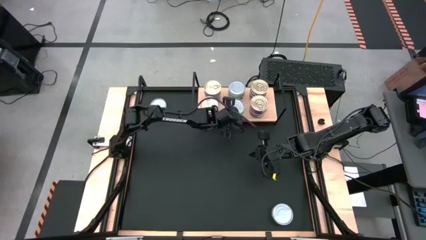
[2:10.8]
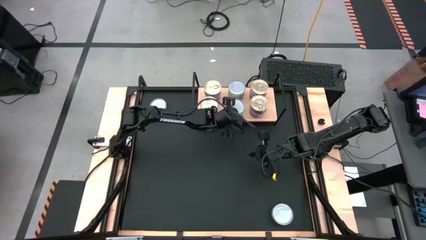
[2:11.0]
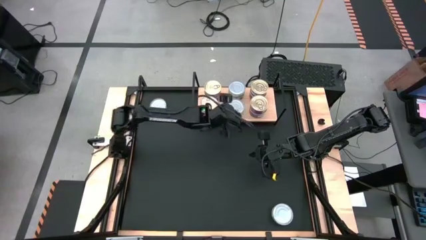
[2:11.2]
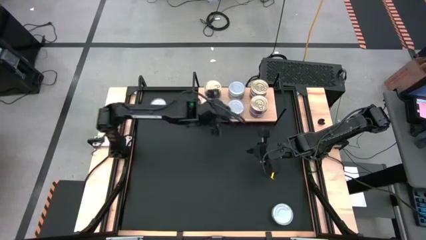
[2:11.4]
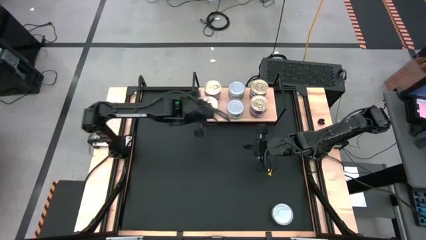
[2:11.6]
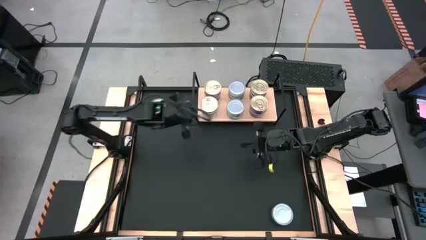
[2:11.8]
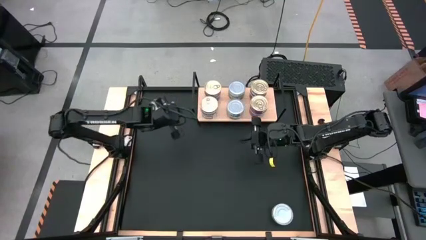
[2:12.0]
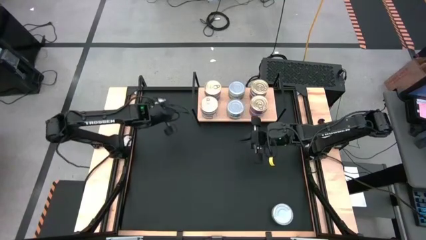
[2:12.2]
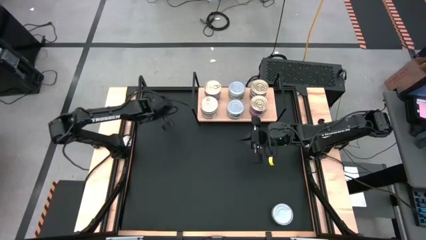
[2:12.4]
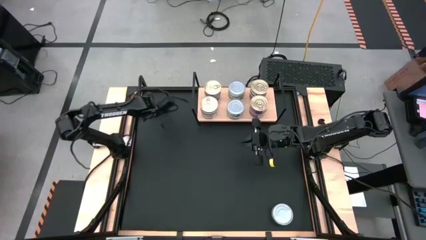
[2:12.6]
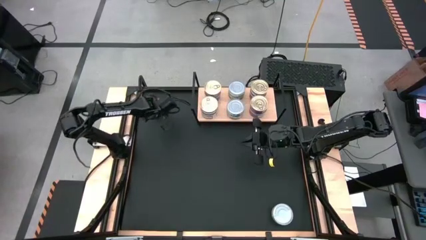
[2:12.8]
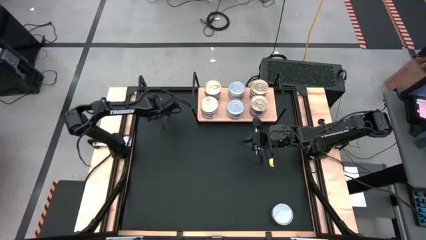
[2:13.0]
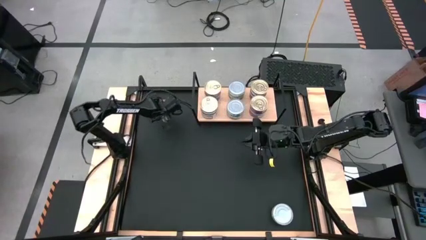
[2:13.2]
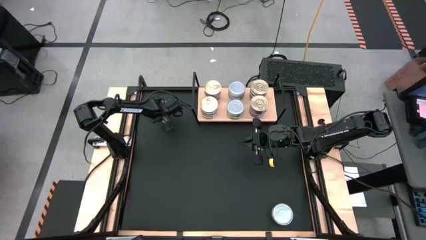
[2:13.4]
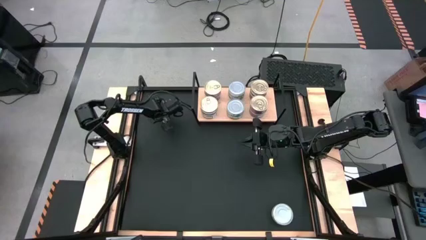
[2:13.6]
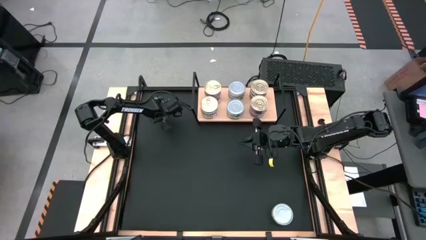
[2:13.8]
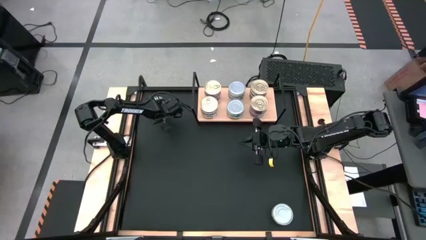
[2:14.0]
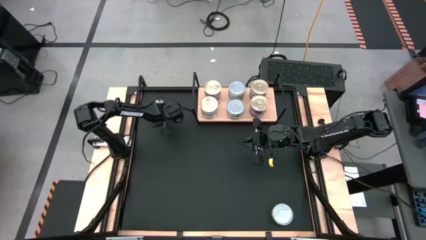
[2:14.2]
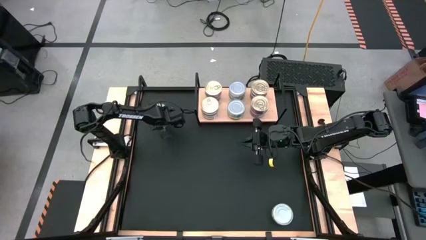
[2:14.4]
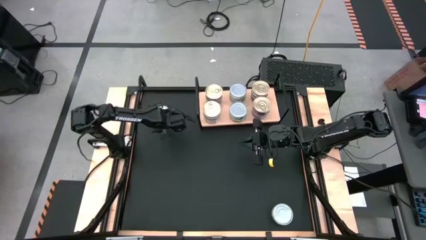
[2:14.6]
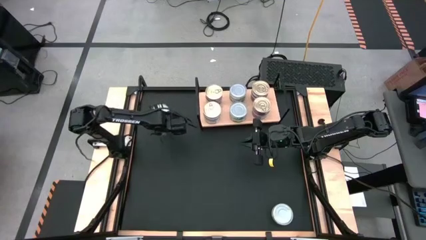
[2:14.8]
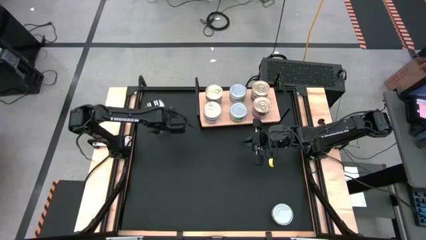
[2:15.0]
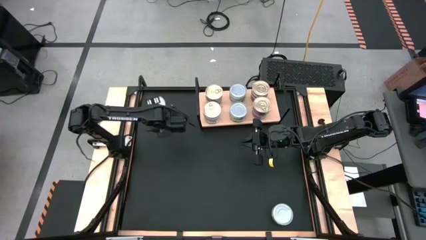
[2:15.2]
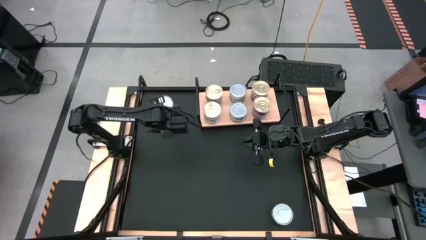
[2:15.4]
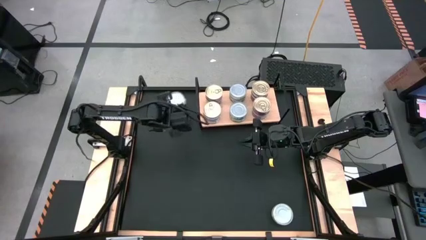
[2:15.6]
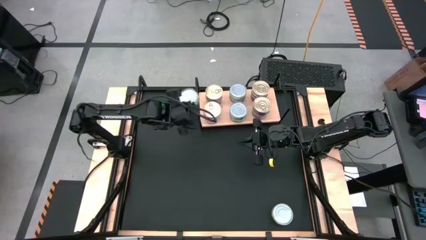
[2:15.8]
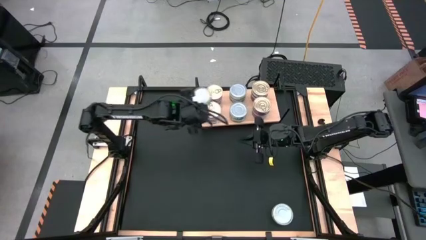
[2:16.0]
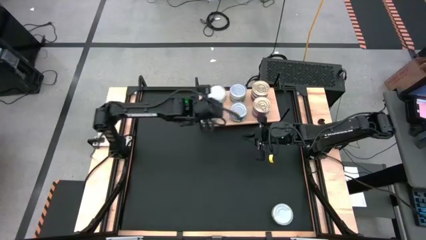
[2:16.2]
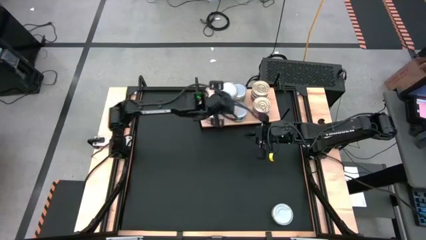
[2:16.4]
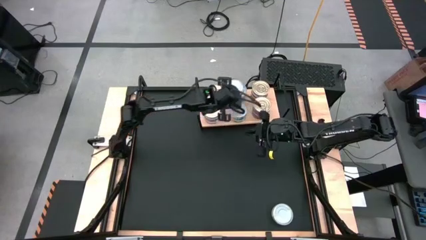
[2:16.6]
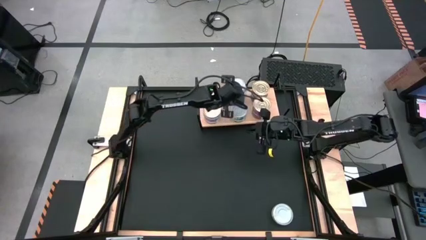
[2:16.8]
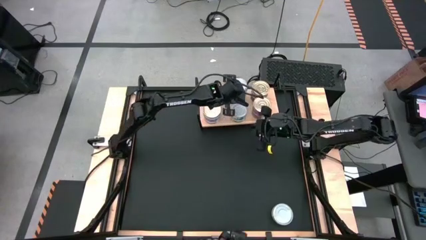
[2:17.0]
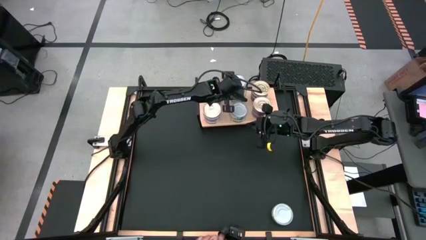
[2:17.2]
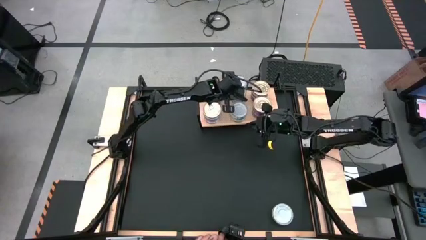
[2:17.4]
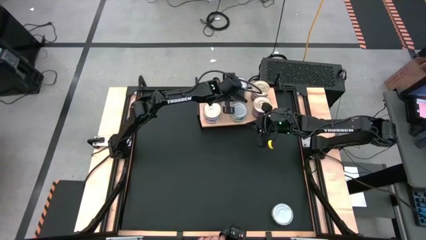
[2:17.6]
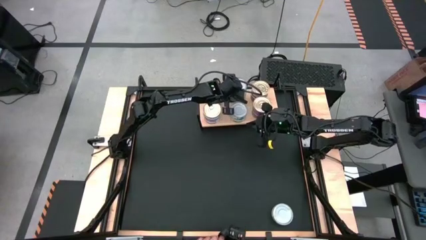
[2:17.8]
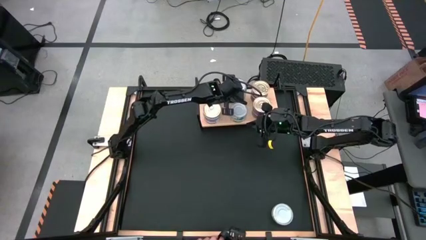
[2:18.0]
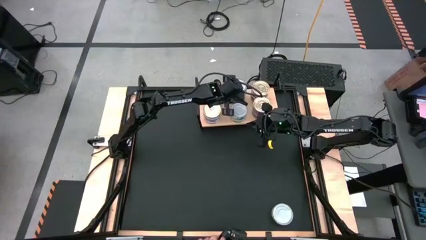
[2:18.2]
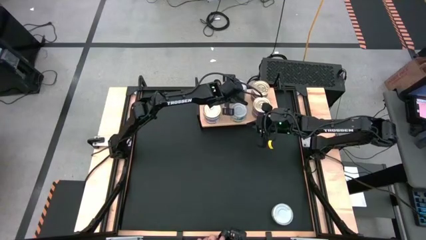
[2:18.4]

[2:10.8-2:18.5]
Task: Stack canned seafood by type on shelf
Stack the green tuna can on top of the other green tuna cans on the shelf

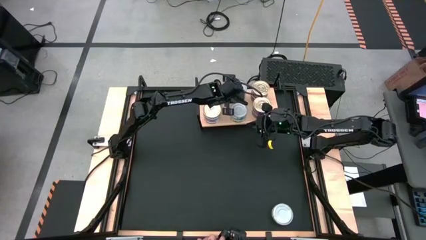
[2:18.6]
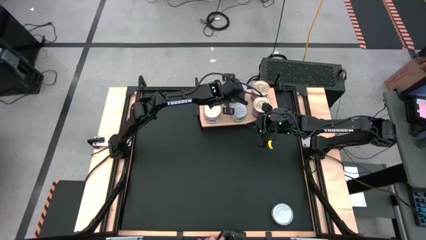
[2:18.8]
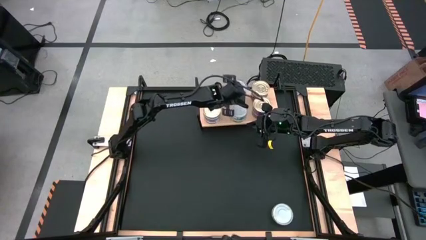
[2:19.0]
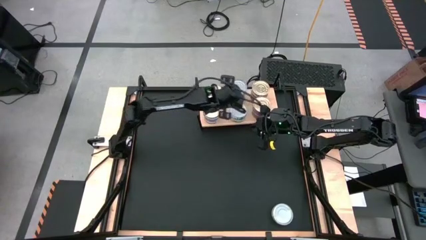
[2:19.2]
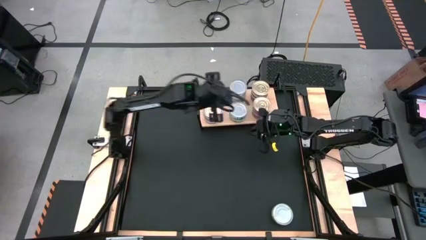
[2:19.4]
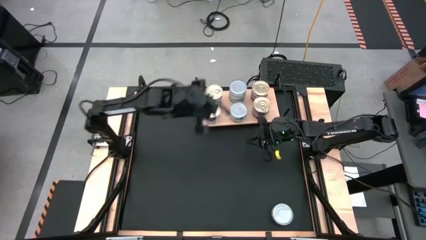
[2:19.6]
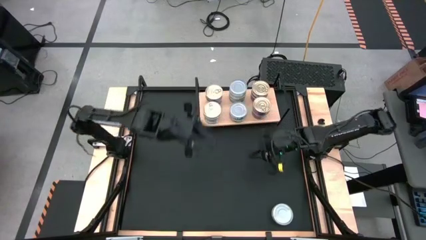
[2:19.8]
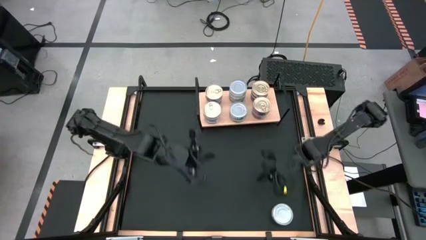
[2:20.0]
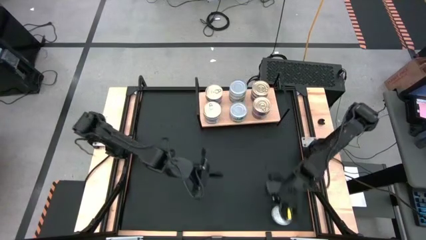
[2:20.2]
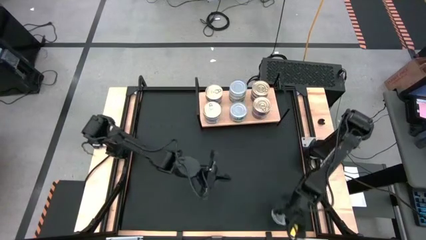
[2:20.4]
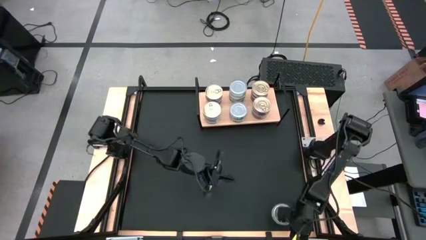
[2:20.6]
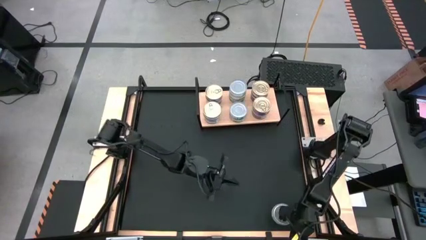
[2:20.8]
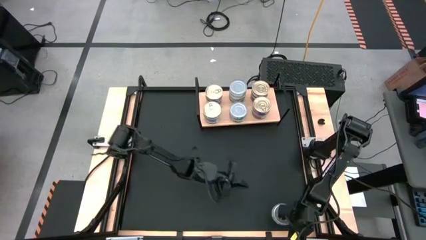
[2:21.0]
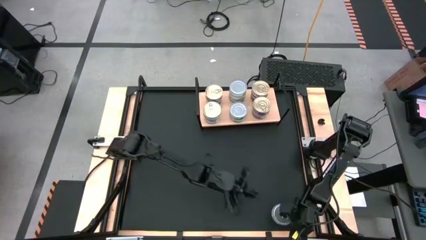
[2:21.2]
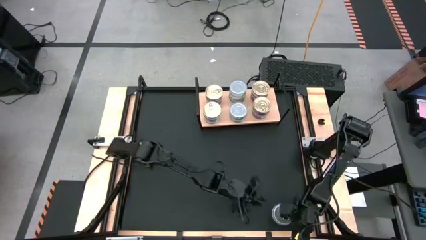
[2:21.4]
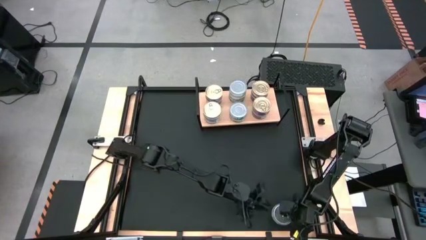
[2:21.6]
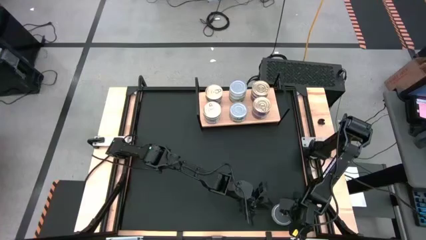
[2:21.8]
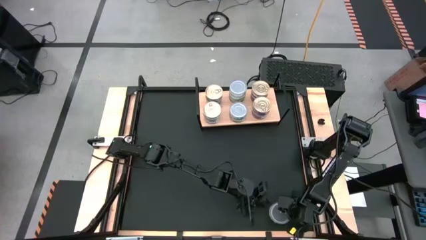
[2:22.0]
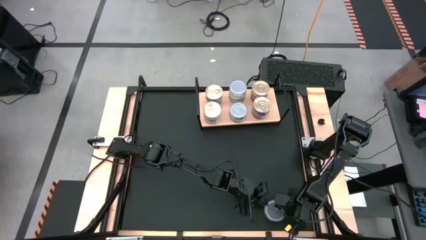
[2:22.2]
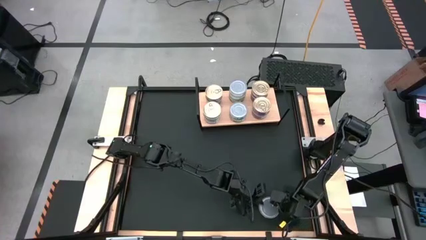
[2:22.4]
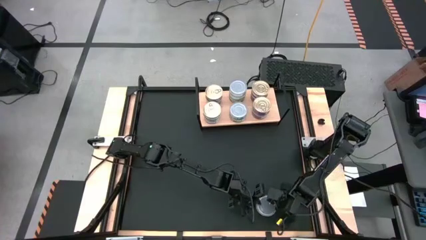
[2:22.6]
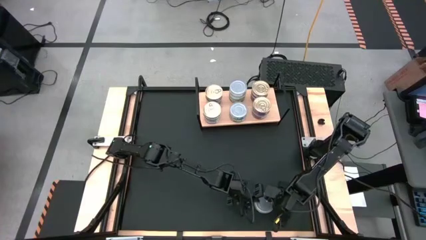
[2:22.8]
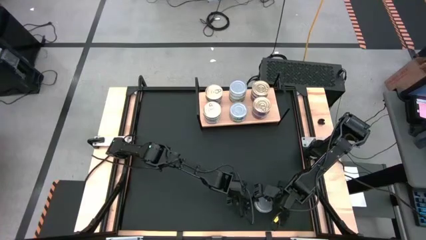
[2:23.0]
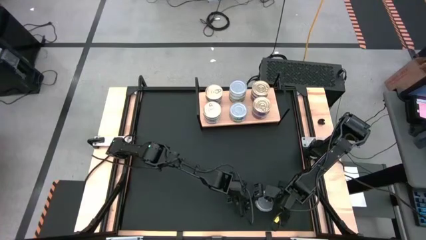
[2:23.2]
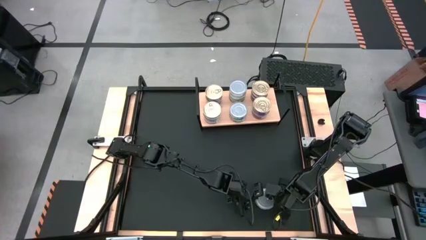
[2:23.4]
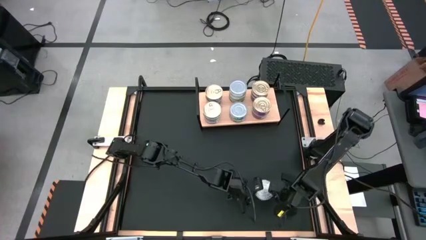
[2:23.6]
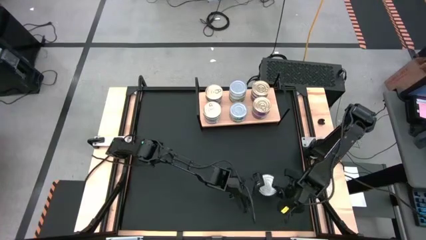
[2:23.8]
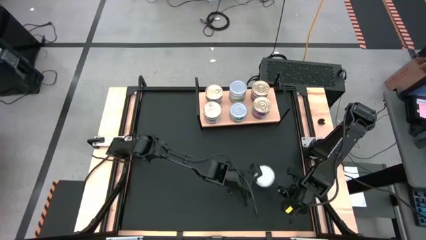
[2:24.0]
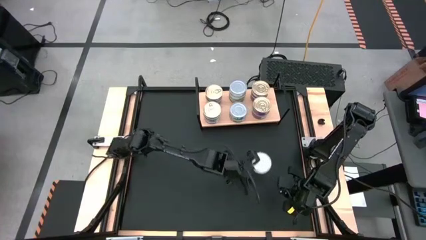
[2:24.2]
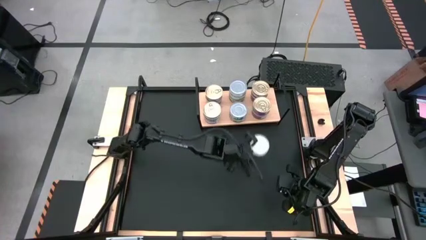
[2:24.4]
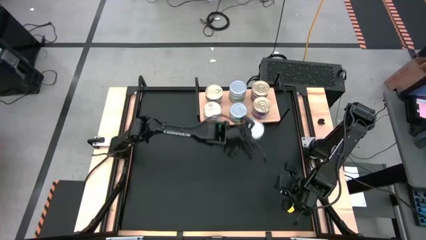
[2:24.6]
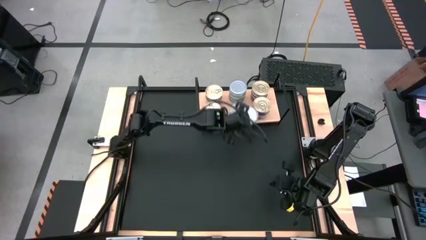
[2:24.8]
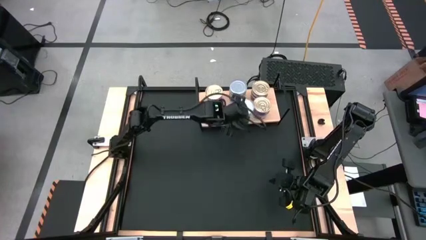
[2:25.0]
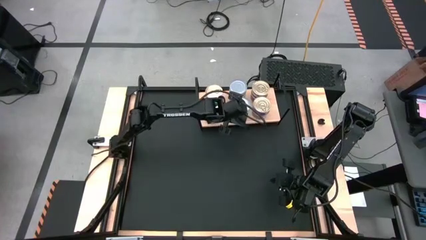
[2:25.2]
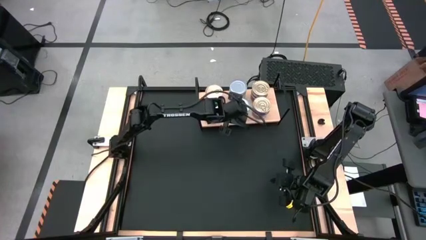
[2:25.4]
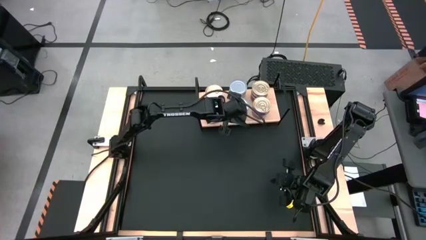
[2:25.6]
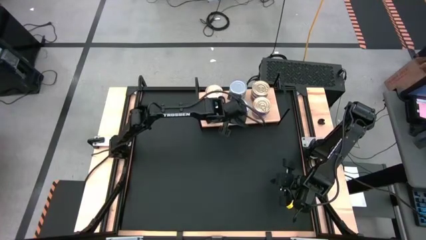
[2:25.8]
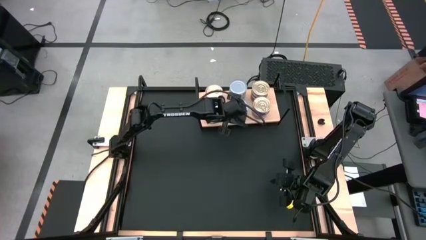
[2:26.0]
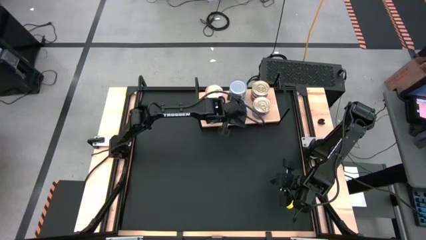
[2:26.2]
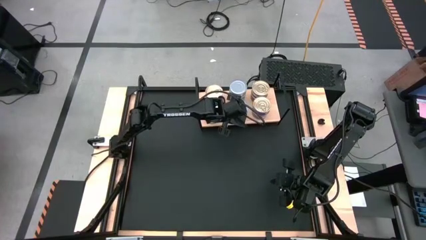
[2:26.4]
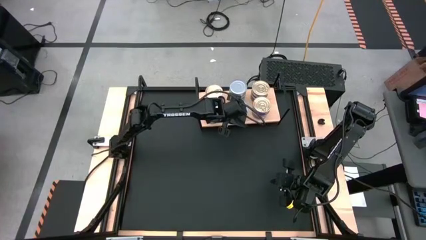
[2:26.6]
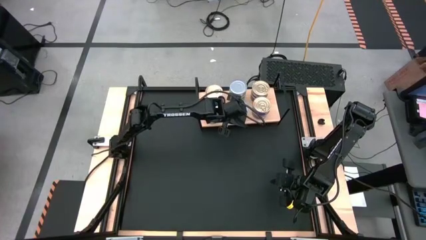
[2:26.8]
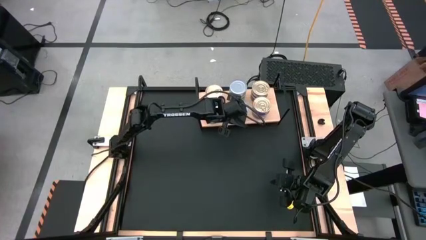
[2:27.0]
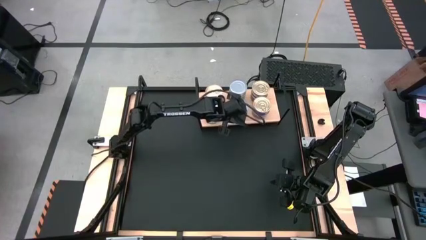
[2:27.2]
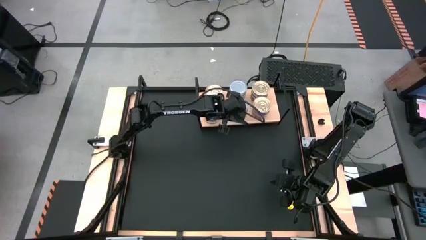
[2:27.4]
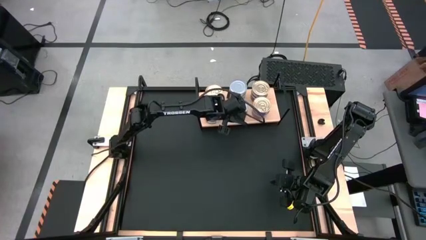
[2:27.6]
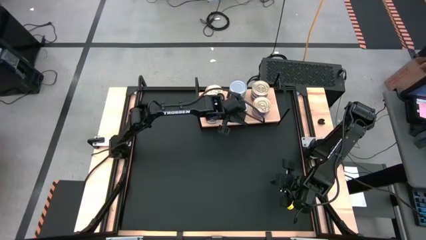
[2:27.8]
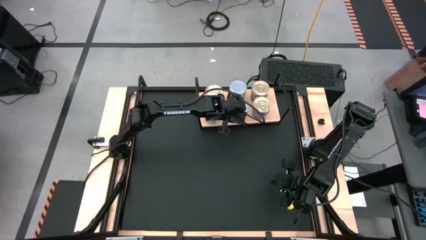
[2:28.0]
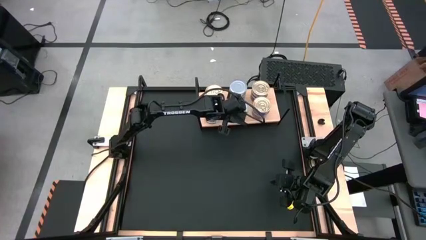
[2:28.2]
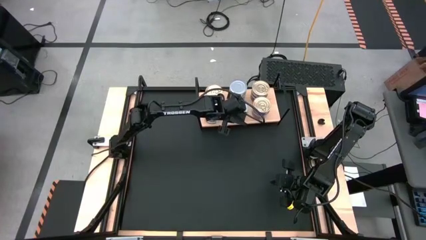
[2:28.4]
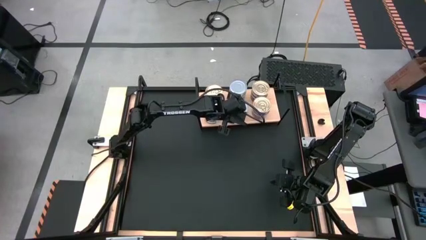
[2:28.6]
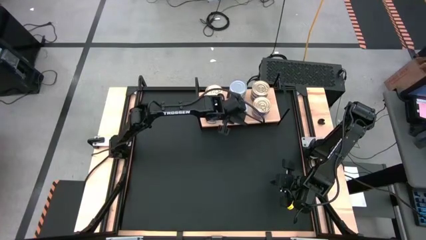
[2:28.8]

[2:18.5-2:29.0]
Stack the green tuna can on top of the other green tuna cans on the shelf
